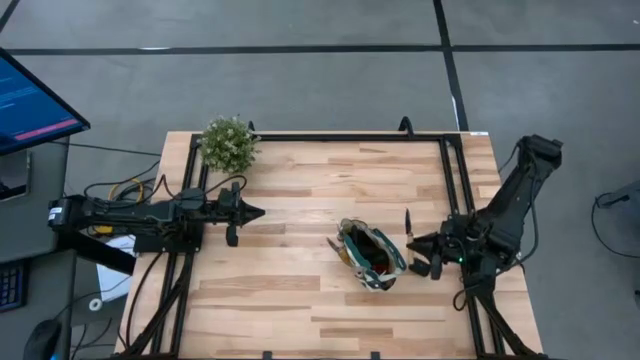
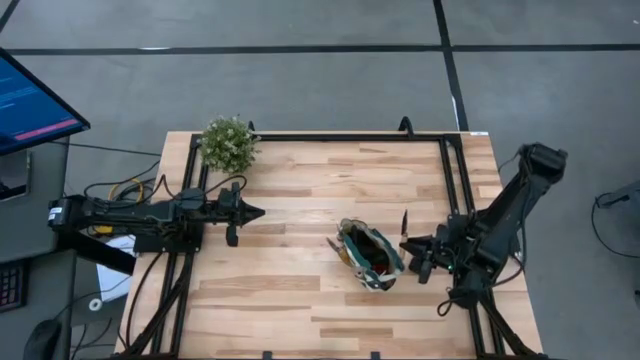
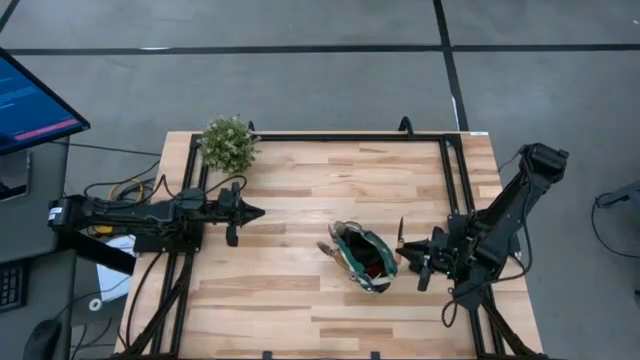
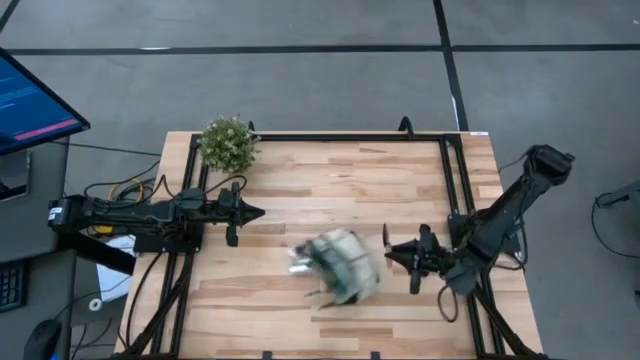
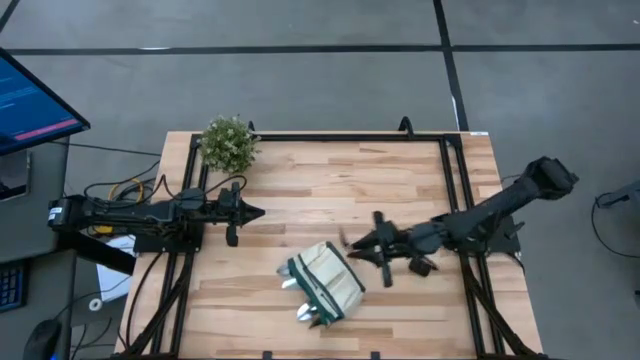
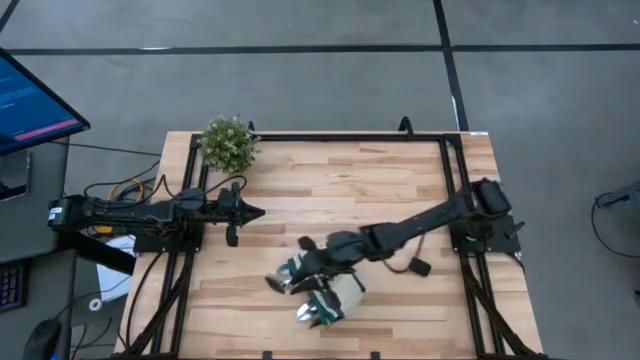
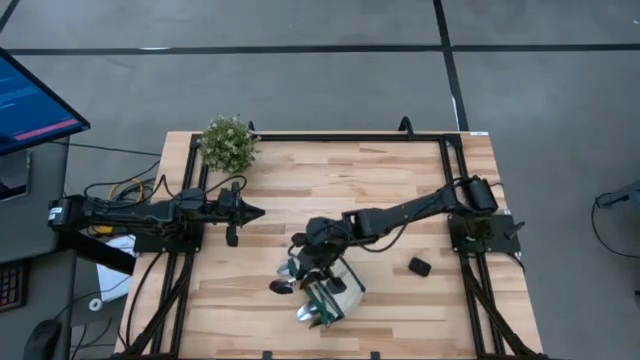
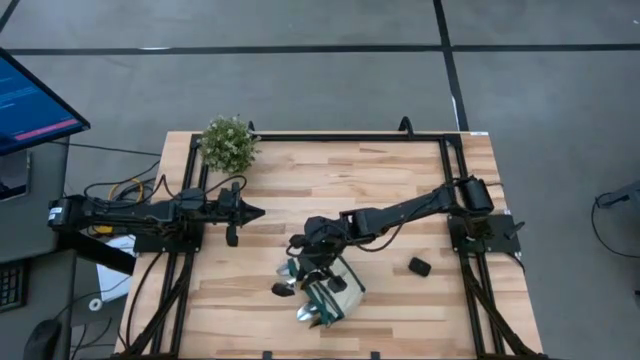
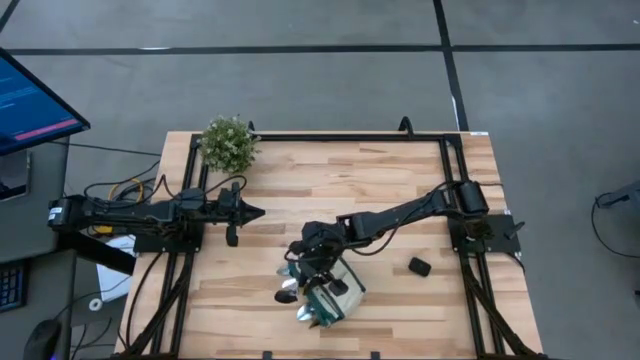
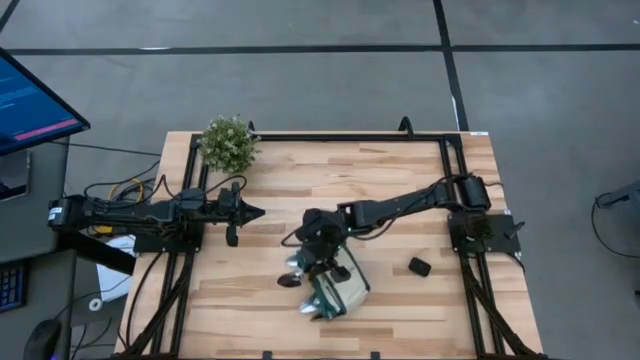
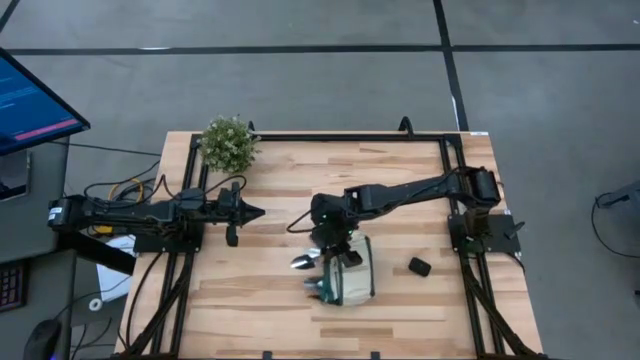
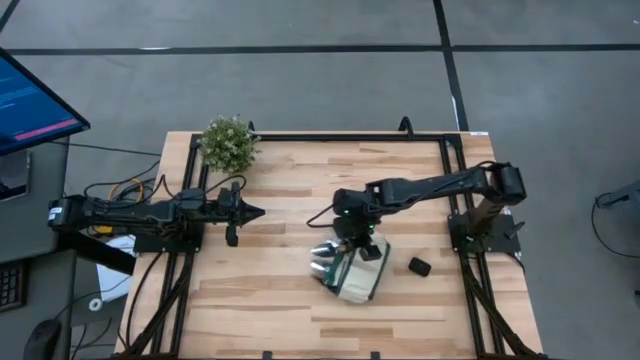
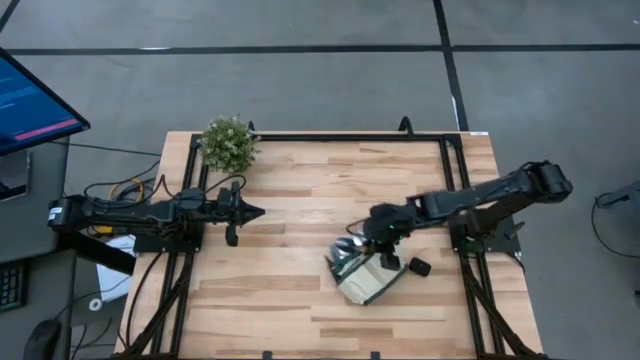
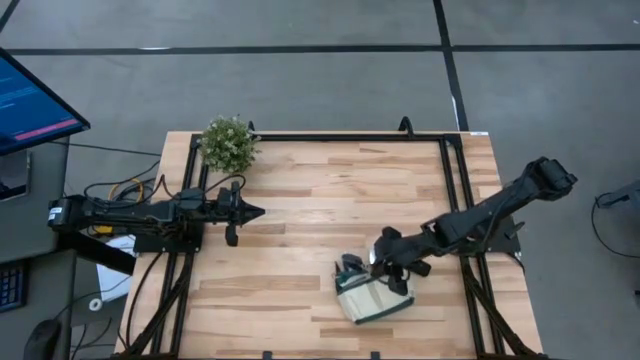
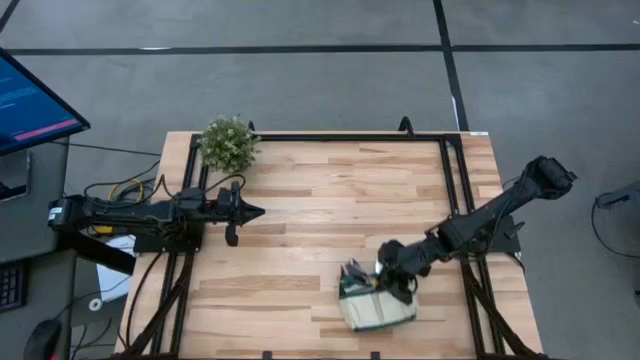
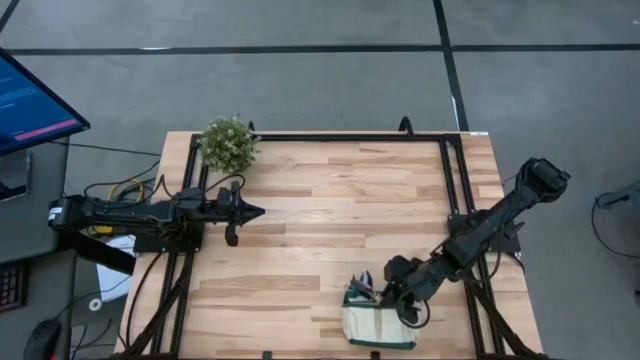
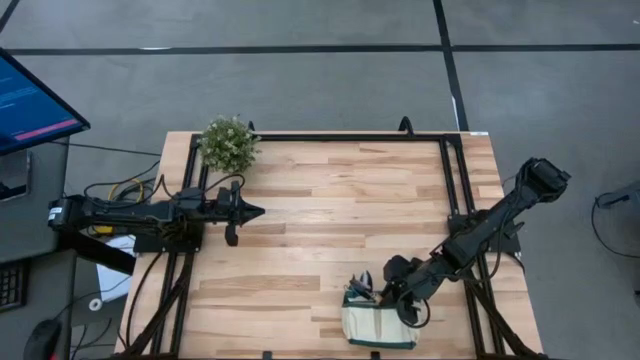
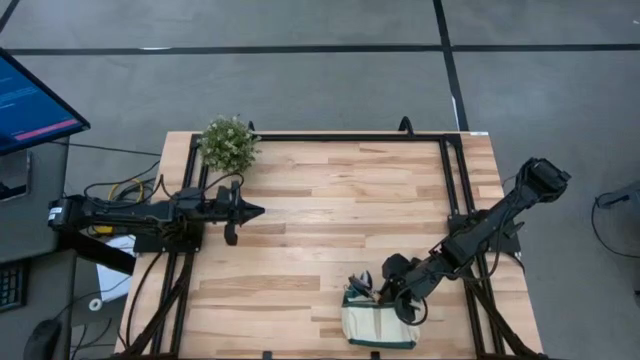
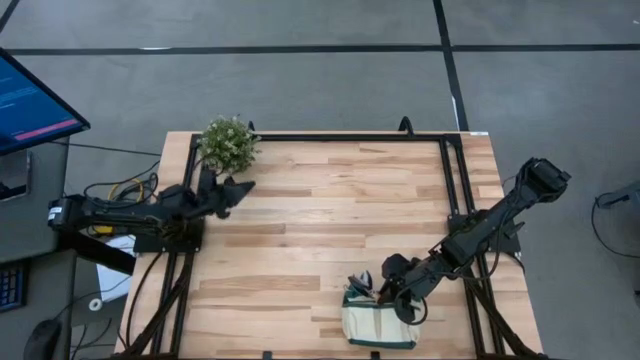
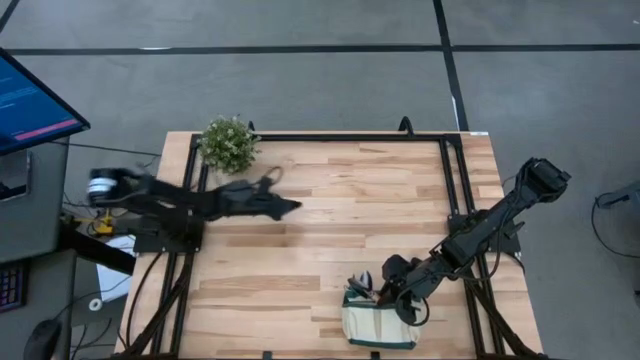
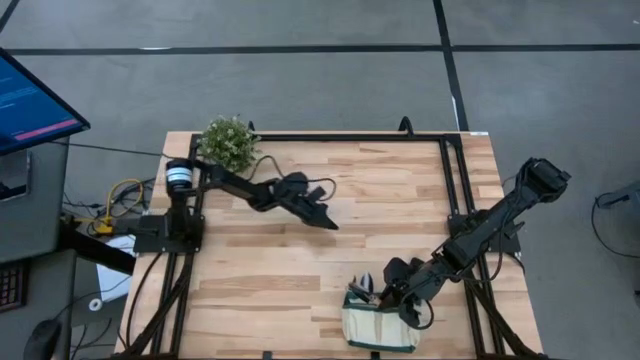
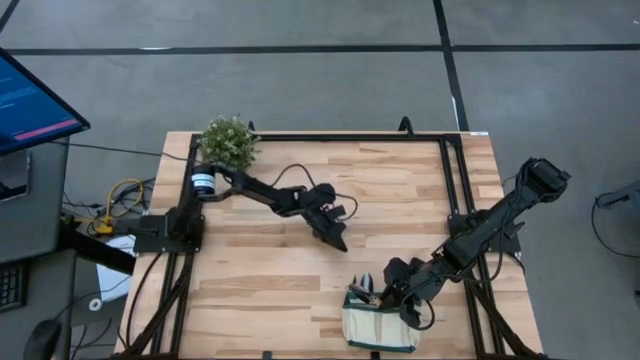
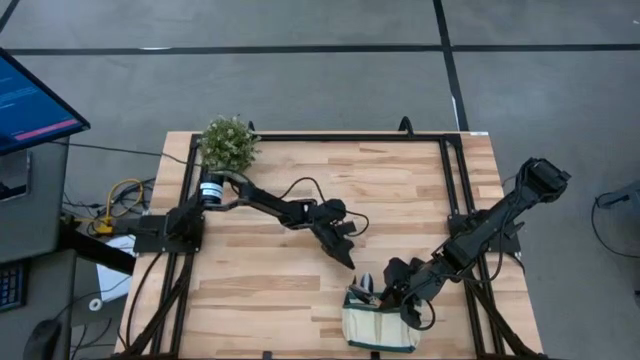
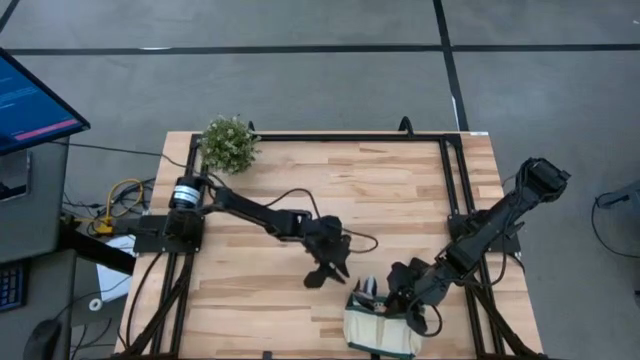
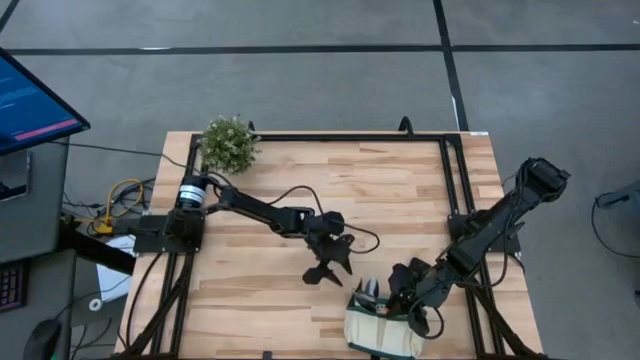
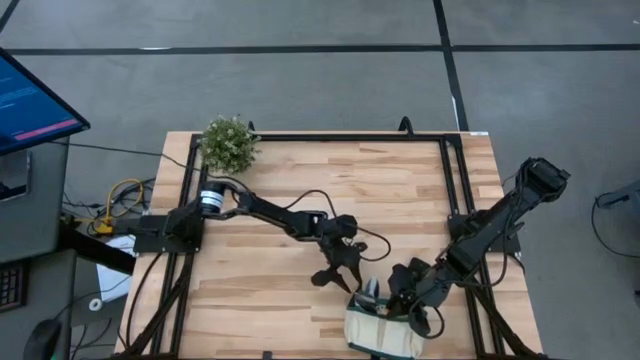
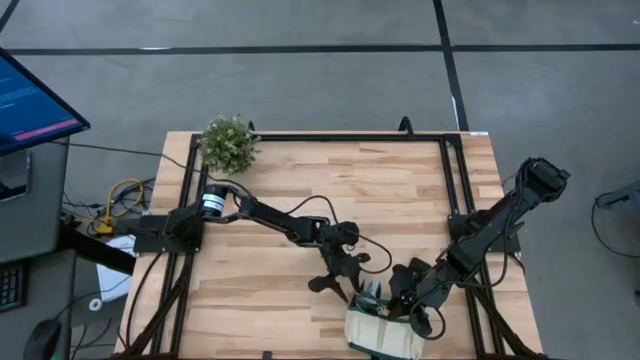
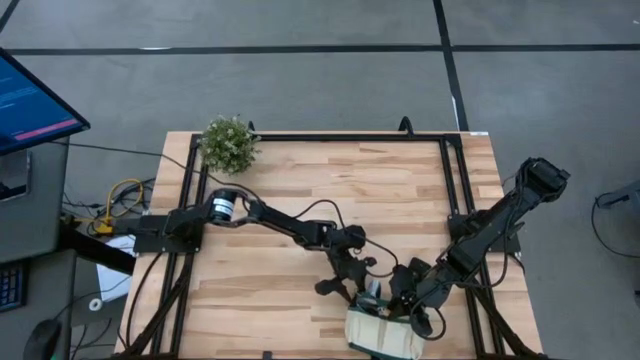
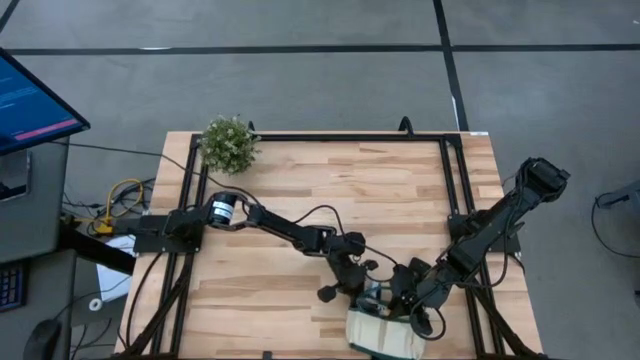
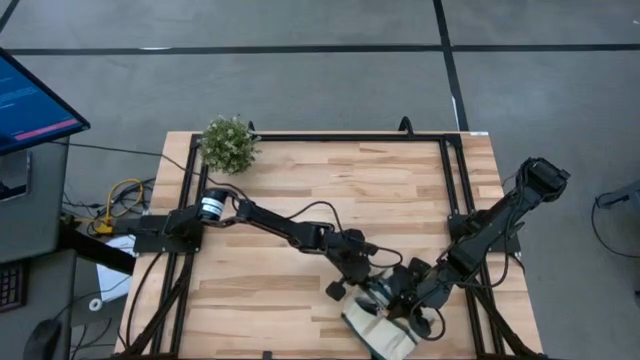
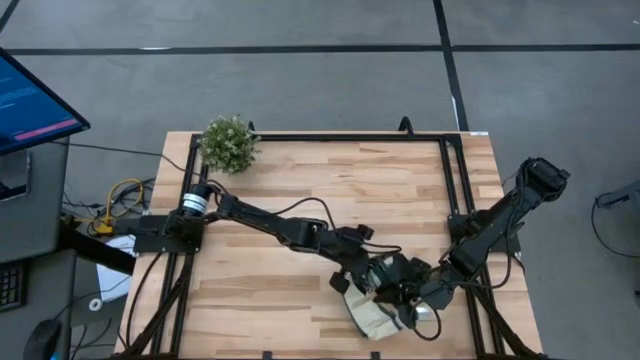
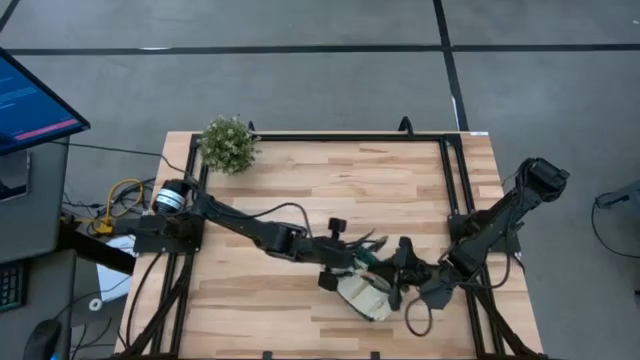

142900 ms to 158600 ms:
Task: Pick & Place Garden tools in Gardening bag
Put the brown trowel into the gardening bag

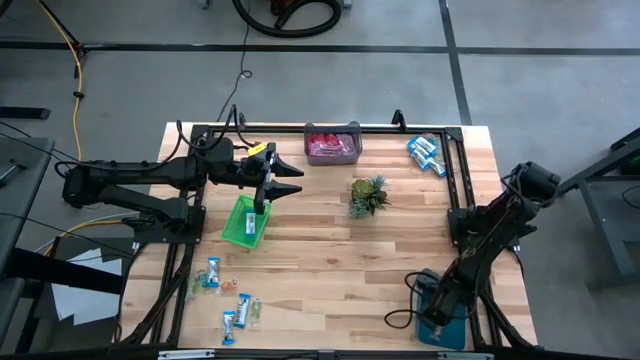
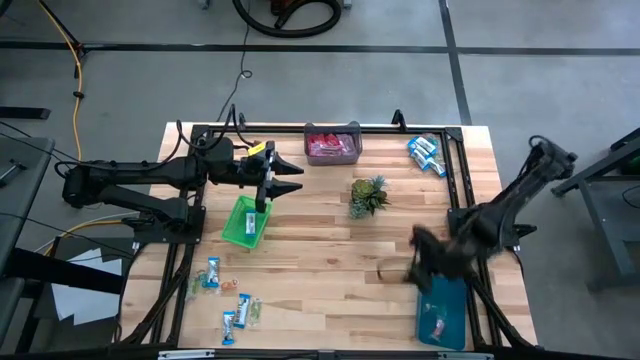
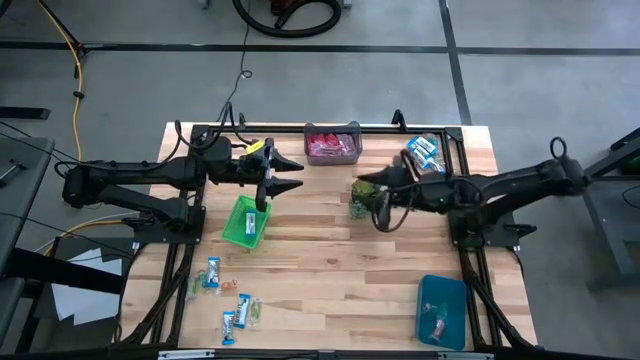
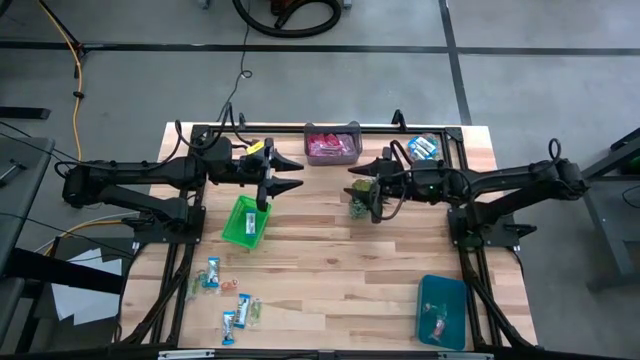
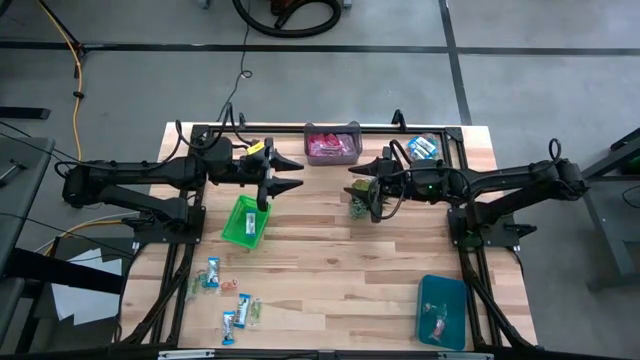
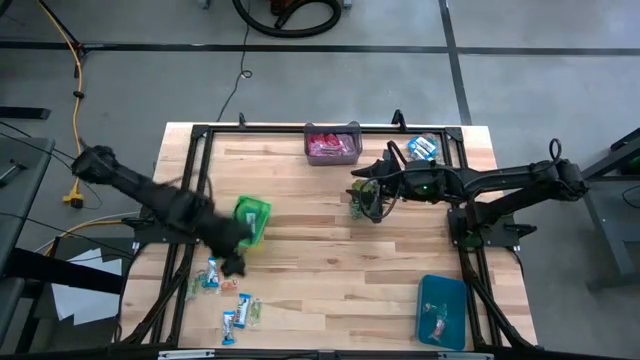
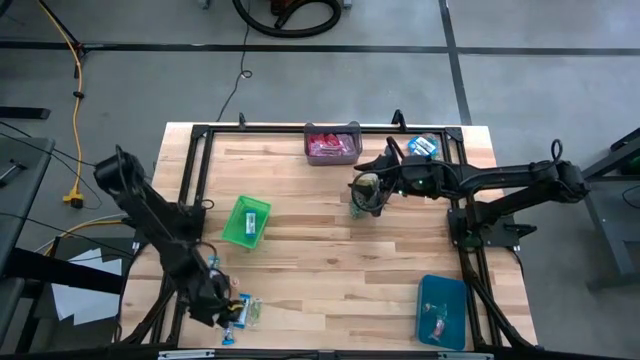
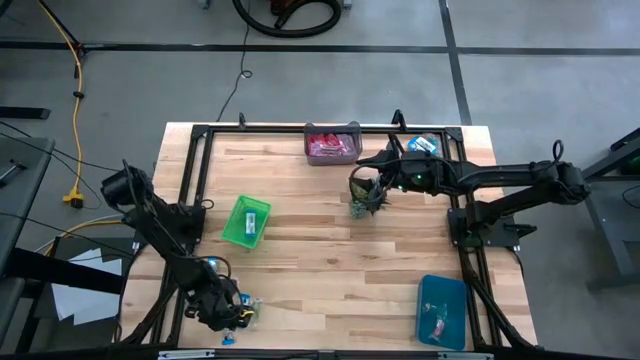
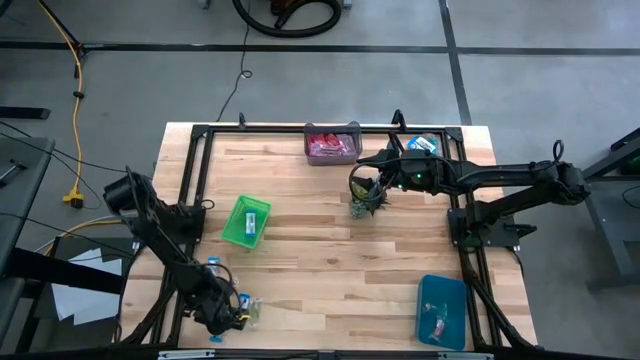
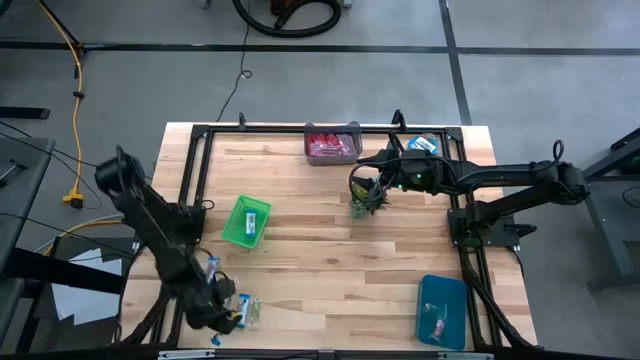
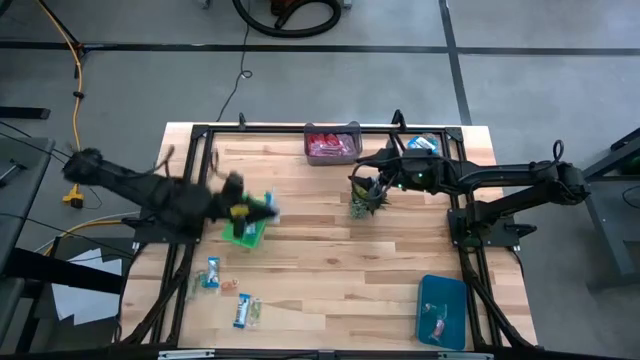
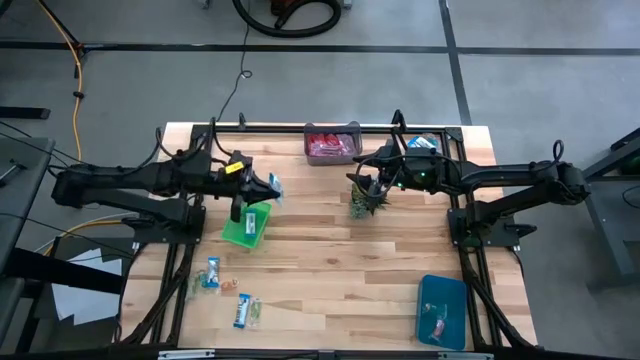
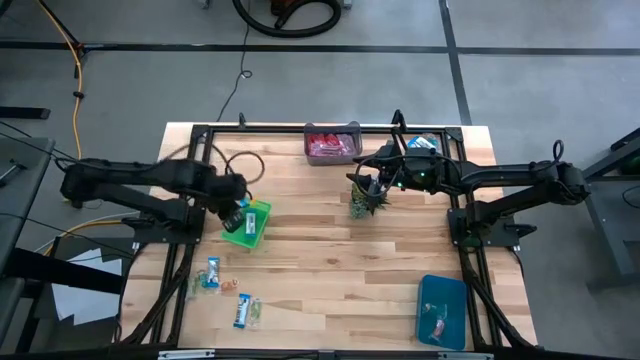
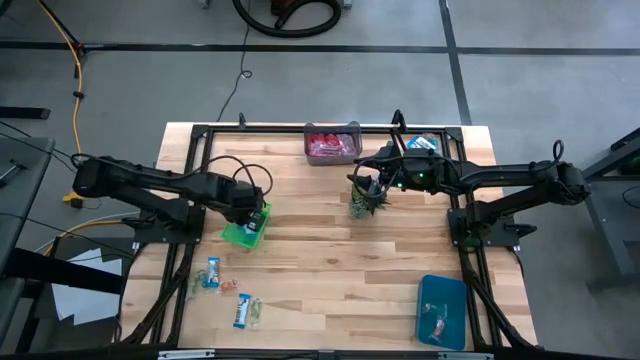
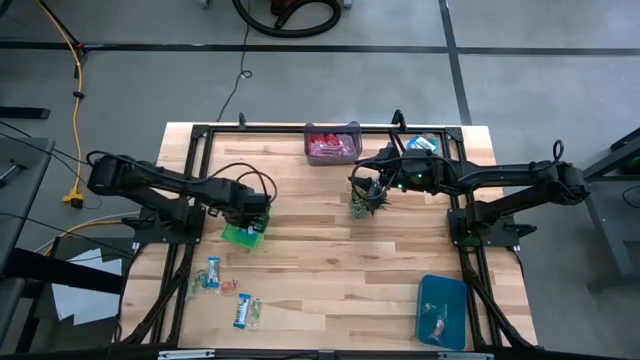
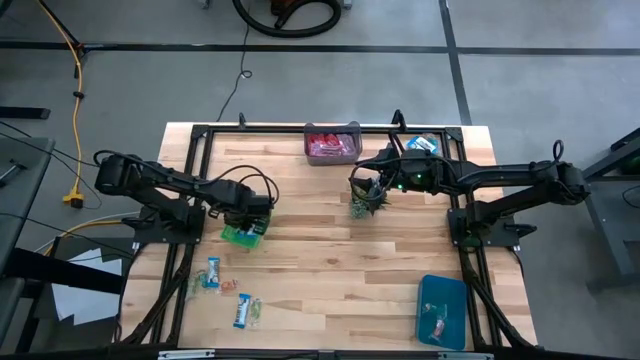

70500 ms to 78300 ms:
Task: Sort candy
Put the white candy into the green bin
